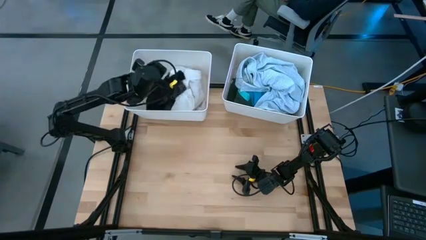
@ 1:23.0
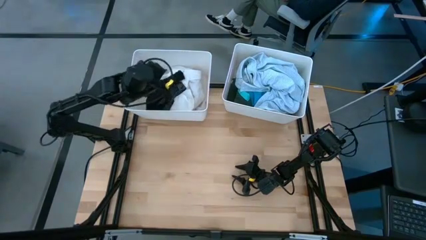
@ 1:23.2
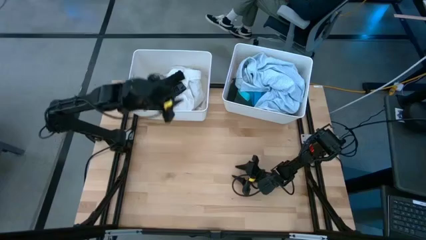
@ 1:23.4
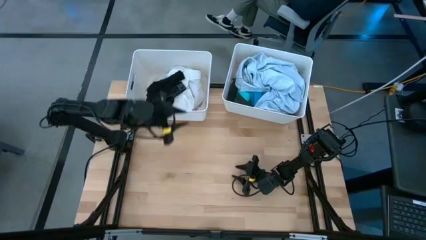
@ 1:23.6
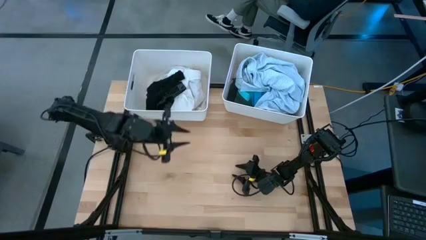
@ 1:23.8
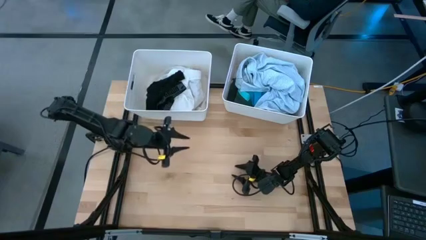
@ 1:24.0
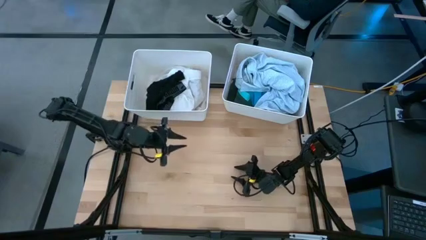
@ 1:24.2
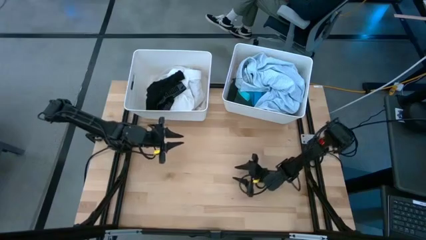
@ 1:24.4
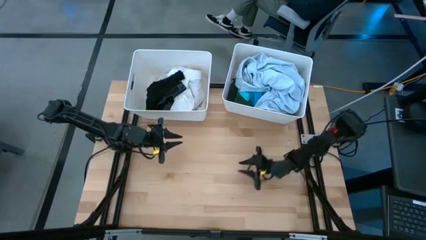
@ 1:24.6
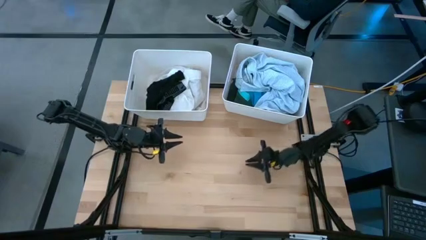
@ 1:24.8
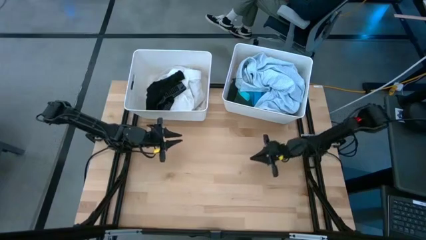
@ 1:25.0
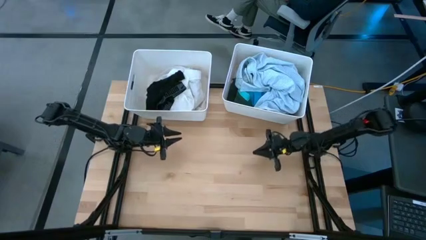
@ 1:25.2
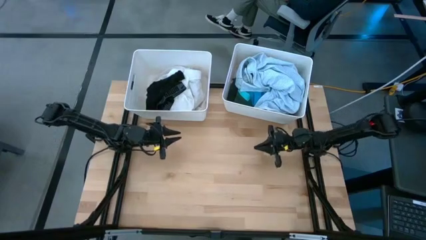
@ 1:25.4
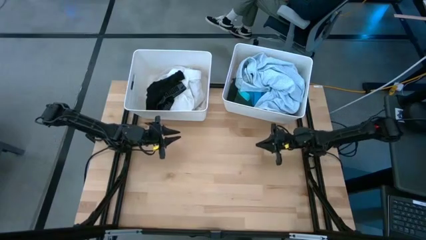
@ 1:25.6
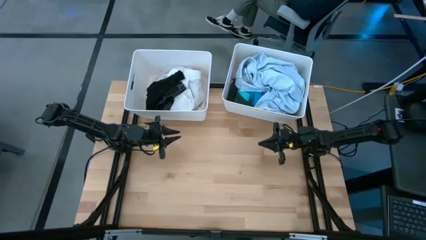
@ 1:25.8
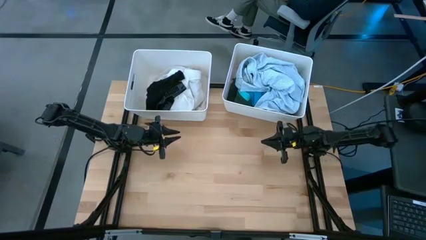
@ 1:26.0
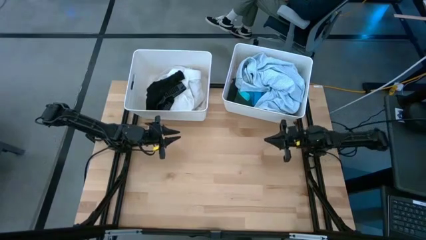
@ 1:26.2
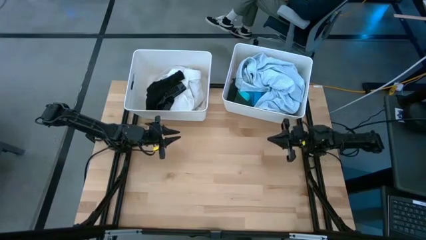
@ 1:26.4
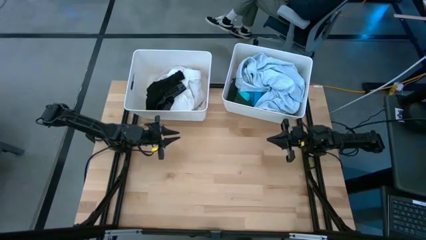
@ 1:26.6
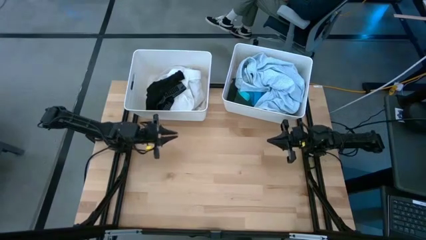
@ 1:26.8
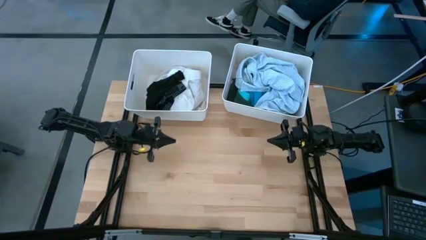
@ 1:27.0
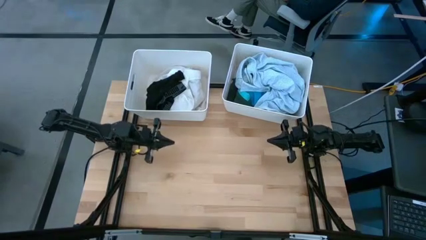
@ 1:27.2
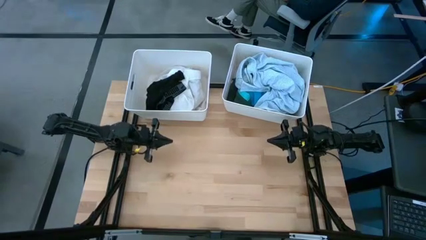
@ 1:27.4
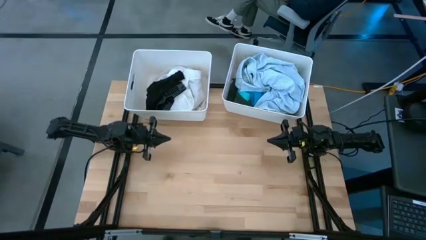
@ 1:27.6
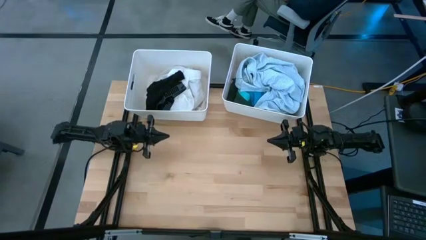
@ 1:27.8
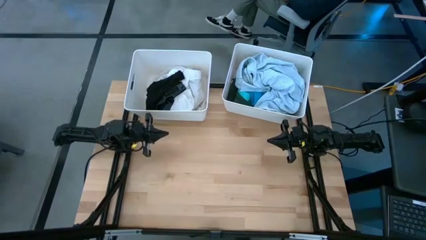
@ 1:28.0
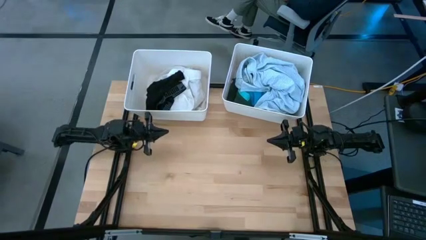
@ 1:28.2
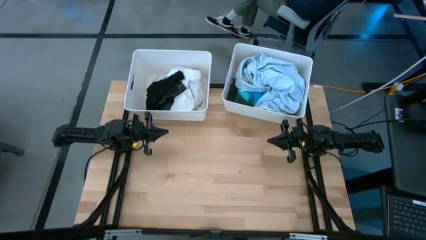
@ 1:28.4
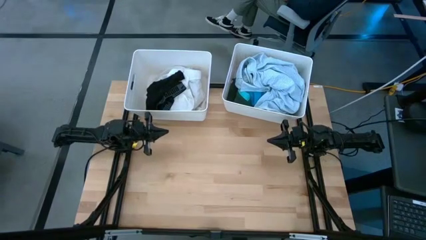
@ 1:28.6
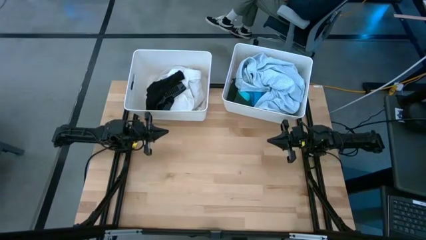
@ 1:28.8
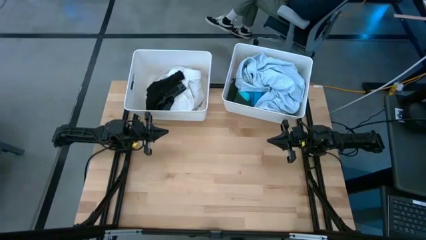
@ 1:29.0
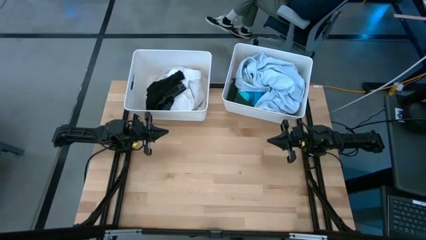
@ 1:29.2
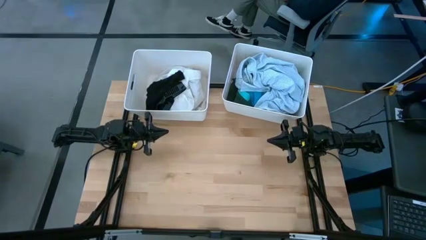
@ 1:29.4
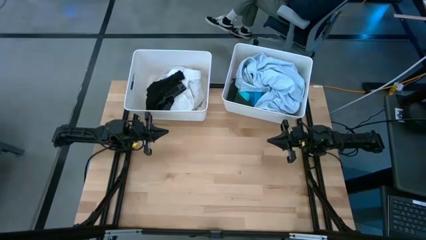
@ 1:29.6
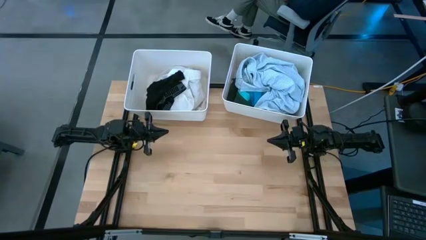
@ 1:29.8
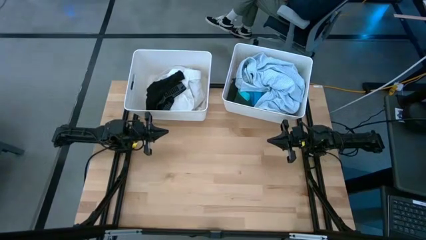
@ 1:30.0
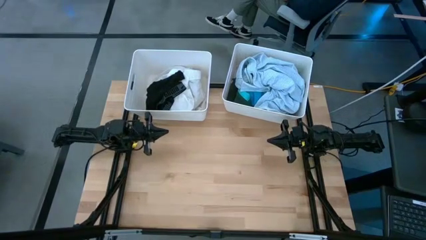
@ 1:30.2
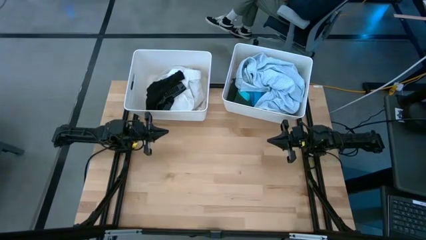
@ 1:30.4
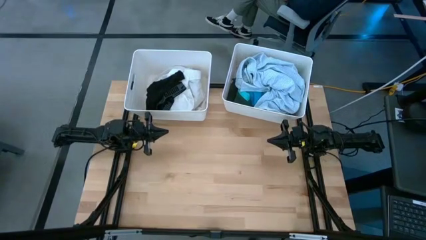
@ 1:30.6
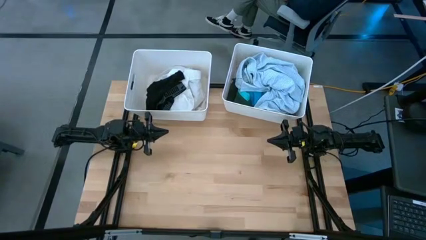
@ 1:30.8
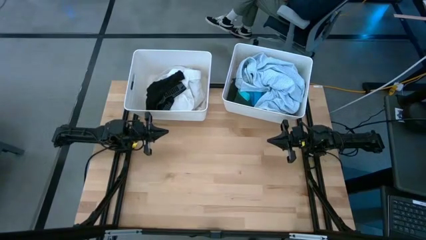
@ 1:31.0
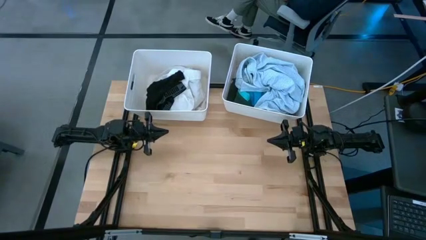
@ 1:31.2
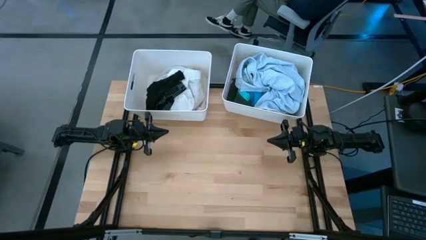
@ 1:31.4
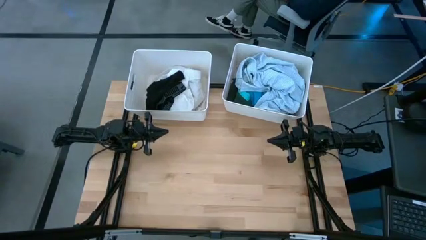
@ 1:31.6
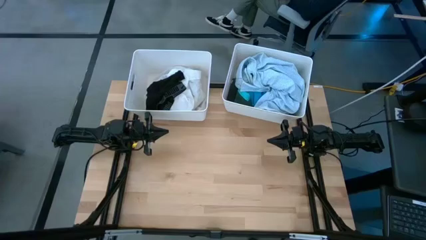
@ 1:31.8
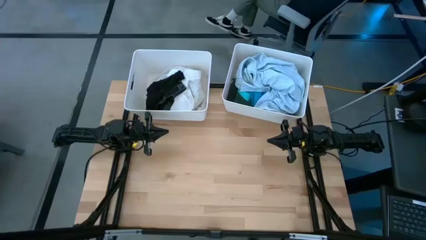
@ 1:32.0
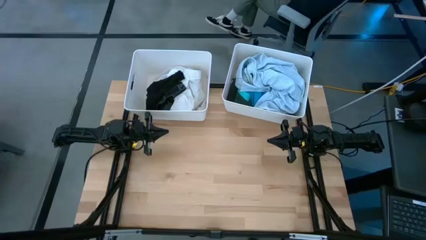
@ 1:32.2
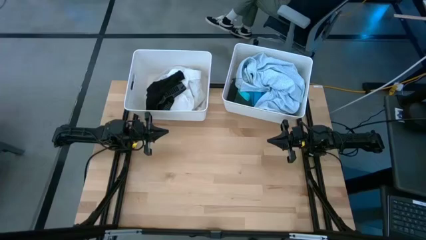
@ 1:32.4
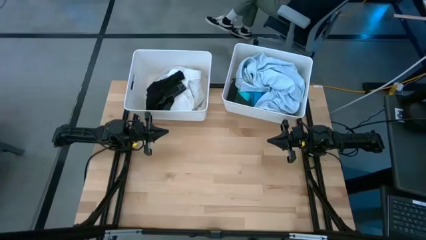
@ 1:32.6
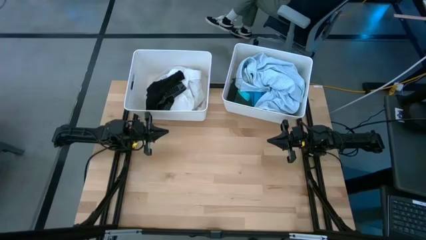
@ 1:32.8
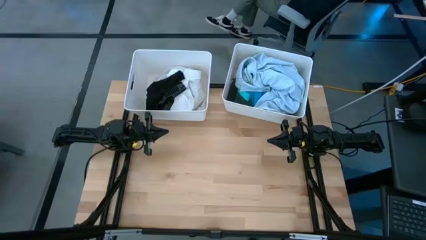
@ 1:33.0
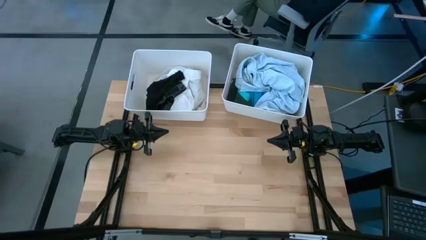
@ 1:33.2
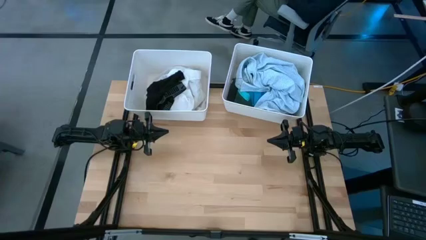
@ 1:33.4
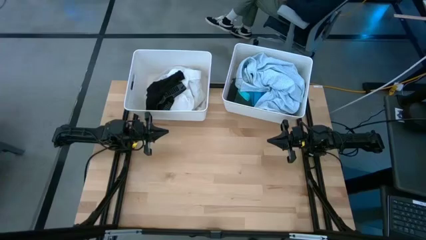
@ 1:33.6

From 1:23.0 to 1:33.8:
Task: Sort clothes
Return to Home Position

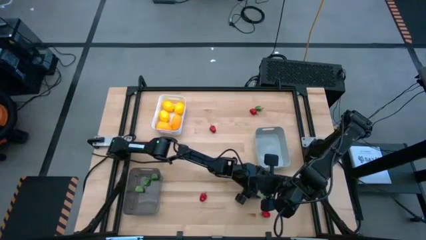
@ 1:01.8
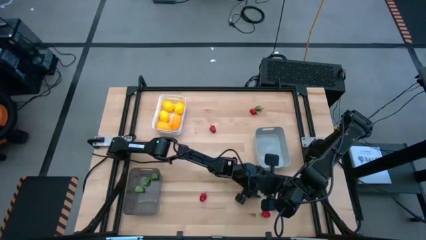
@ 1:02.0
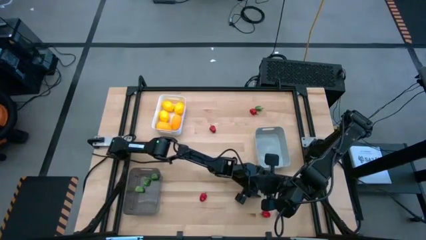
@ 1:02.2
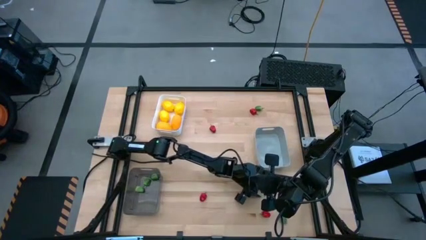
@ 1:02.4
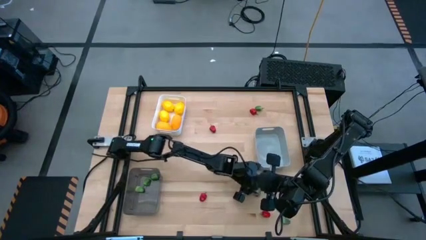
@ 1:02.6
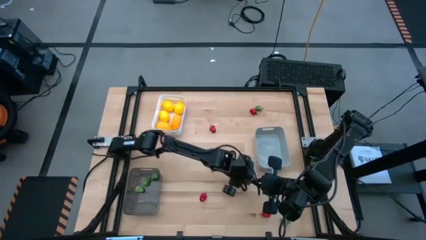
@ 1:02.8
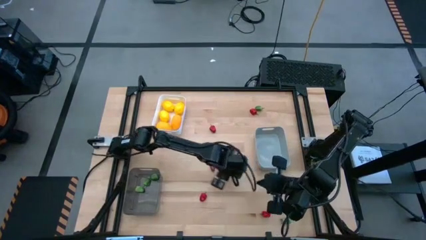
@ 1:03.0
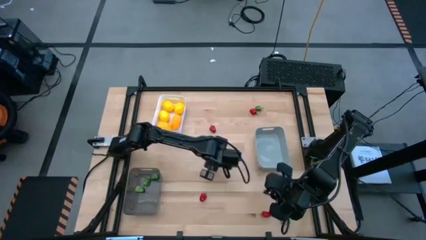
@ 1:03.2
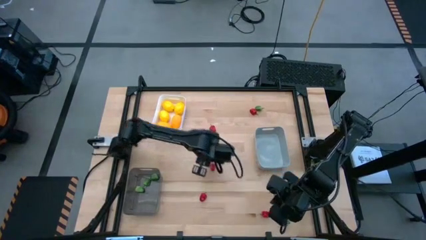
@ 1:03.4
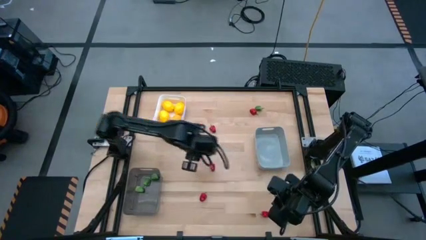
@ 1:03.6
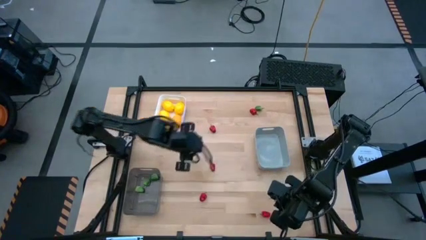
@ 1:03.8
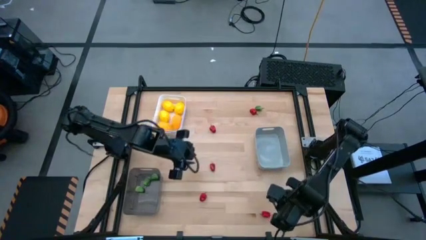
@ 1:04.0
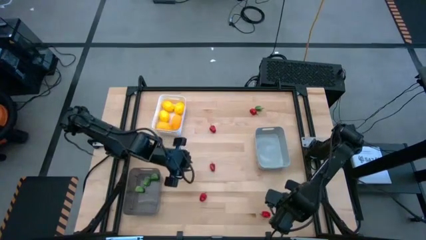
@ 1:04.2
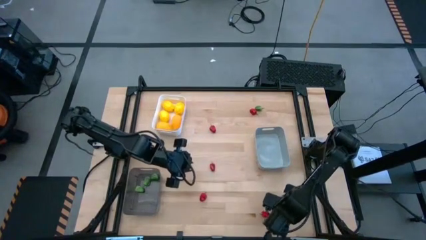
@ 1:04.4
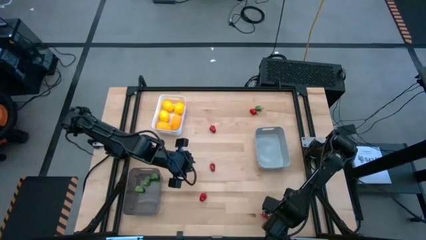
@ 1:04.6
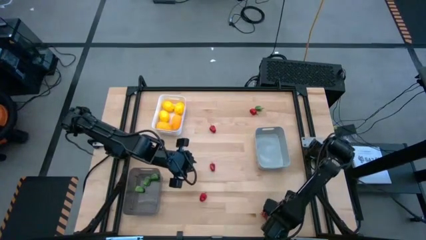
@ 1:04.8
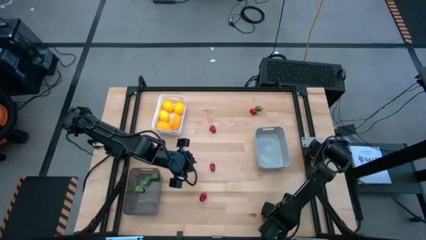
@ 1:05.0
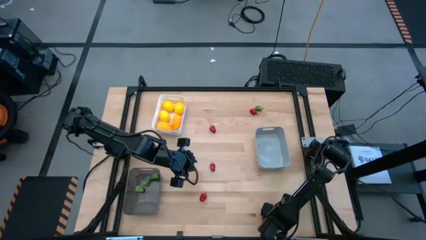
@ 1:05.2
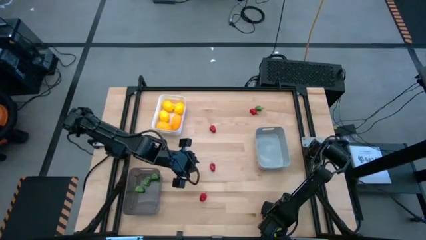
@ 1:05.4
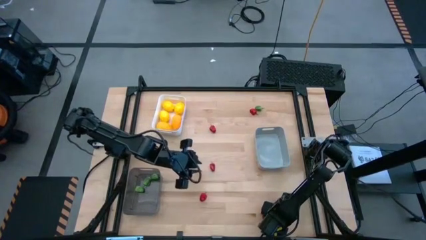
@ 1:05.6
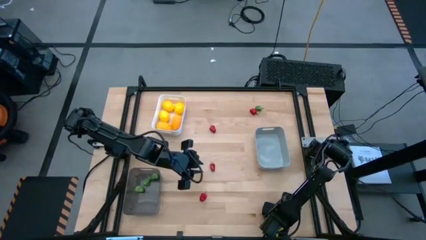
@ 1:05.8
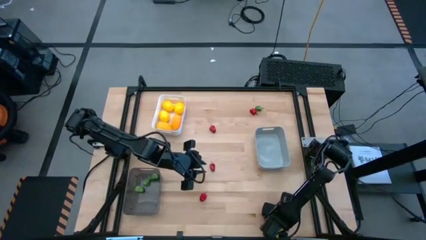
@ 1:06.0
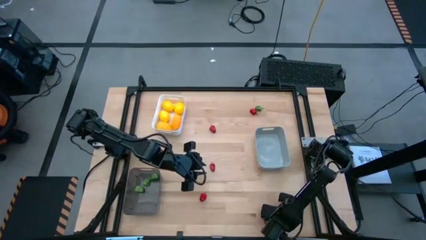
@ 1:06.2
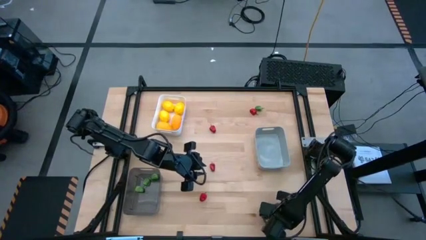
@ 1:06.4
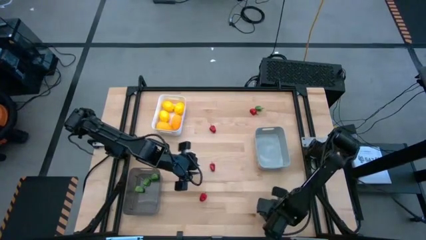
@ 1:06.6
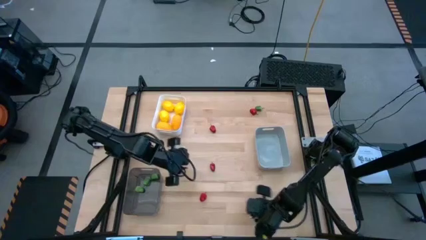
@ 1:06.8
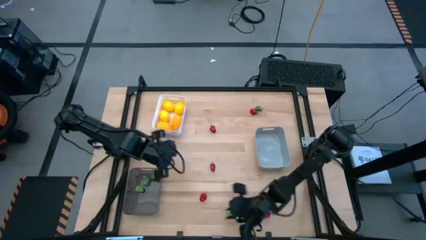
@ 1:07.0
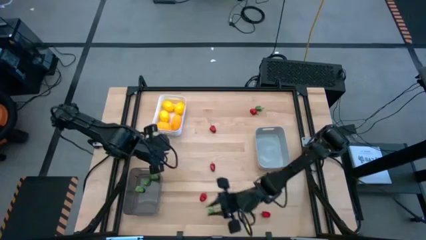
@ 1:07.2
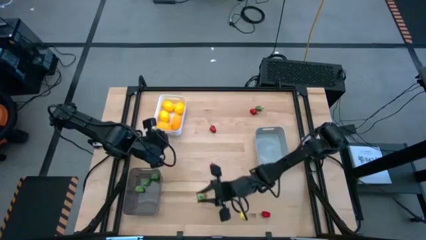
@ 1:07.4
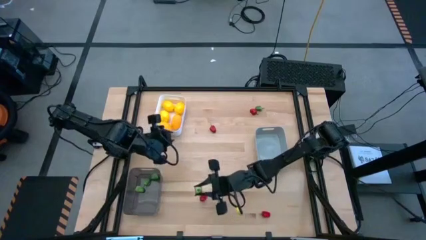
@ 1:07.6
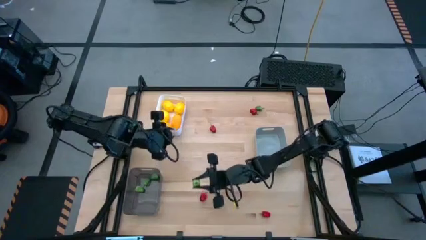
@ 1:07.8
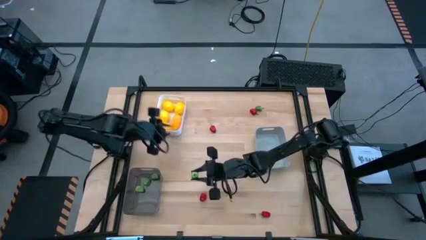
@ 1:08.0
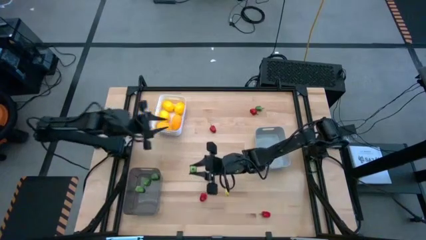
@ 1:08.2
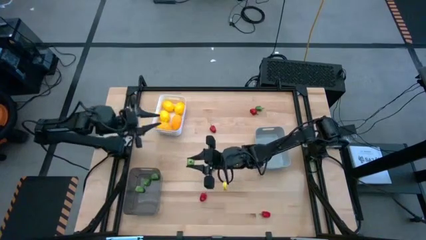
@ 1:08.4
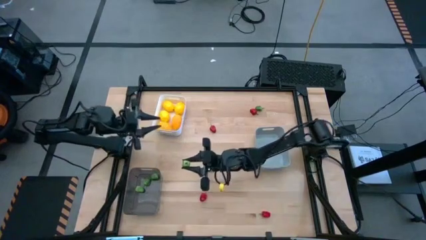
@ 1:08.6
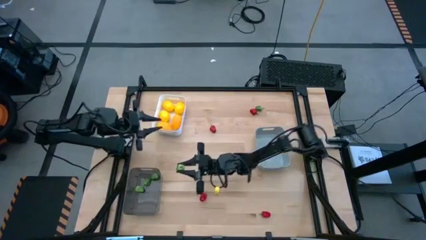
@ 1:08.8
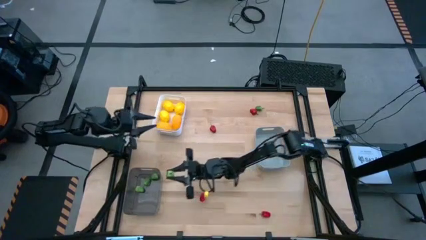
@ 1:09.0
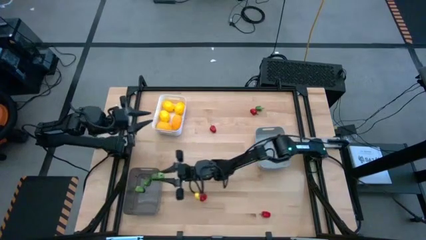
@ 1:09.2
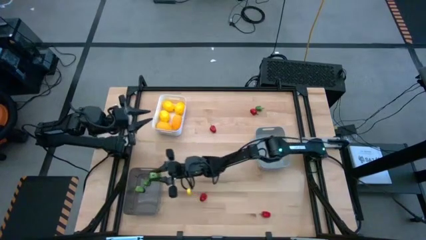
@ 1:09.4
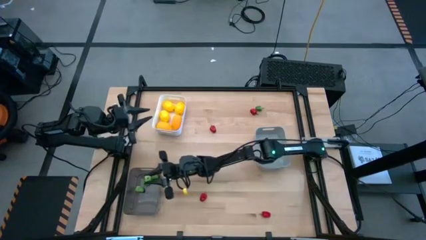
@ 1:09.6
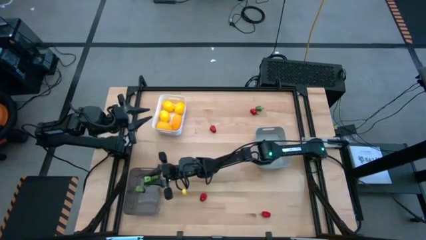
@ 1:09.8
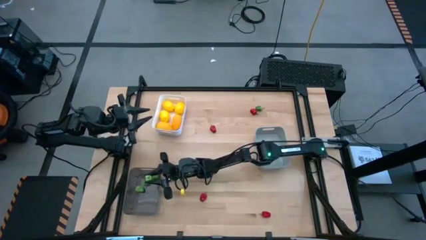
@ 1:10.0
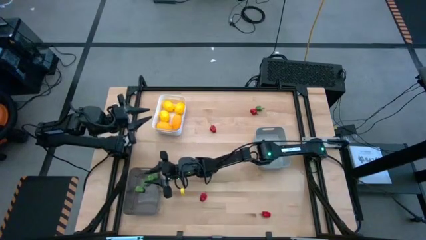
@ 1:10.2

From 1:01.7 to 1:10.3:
Task: Sort produce into baskets
Put the bottom green chili pepper into the transparent black bin
